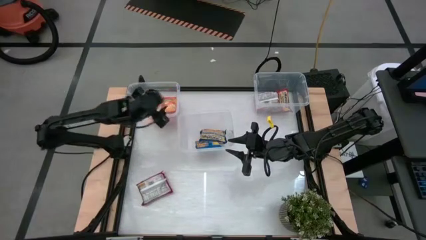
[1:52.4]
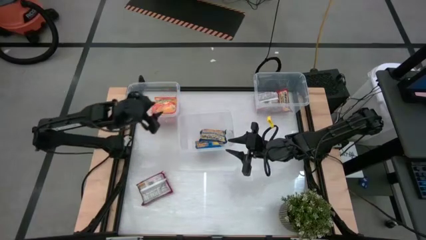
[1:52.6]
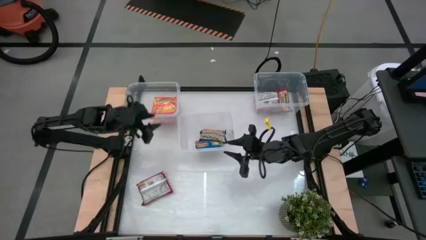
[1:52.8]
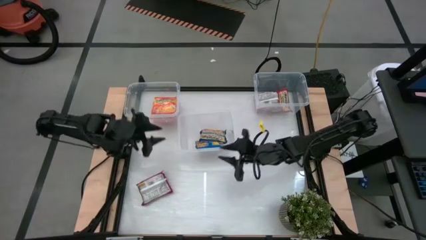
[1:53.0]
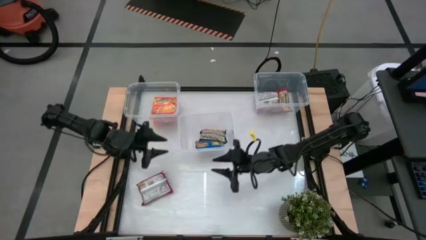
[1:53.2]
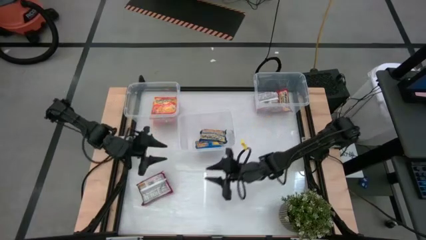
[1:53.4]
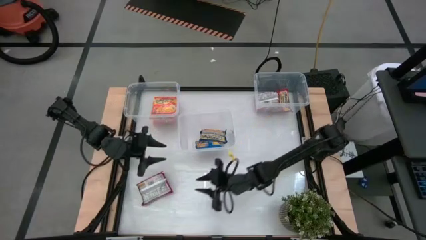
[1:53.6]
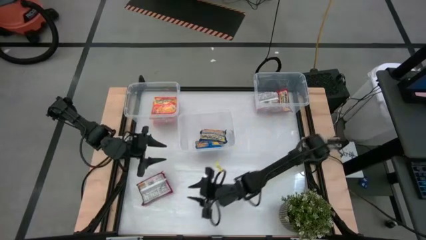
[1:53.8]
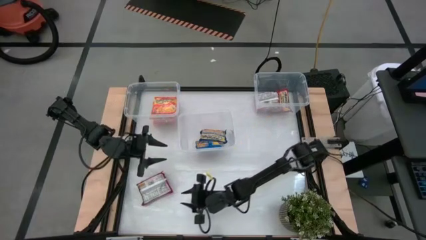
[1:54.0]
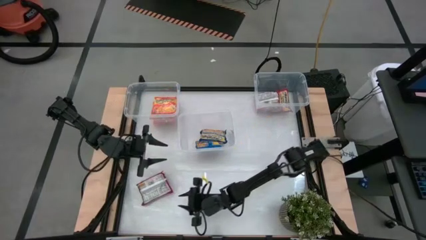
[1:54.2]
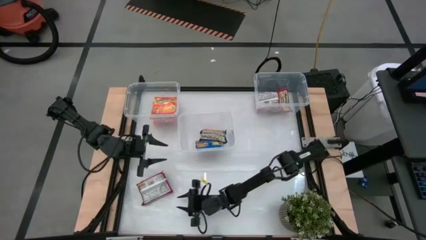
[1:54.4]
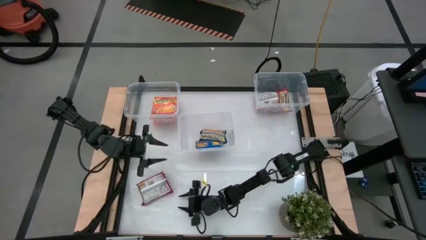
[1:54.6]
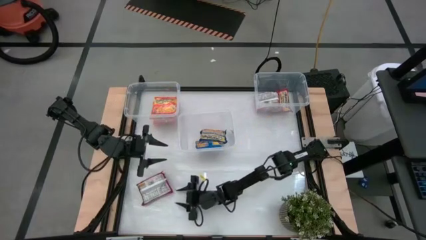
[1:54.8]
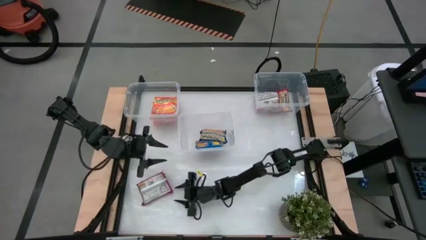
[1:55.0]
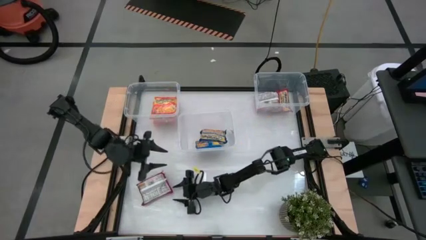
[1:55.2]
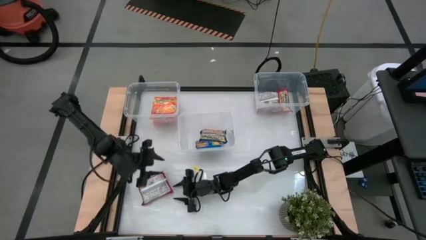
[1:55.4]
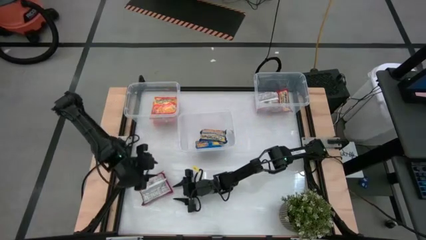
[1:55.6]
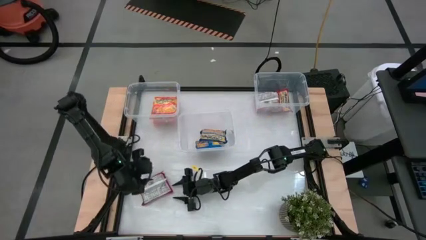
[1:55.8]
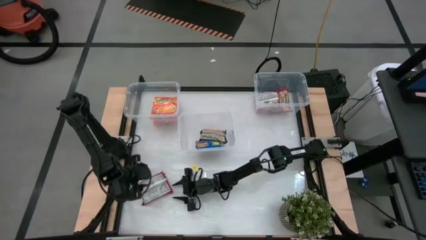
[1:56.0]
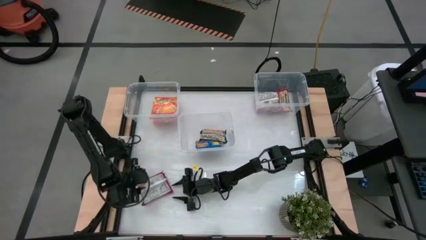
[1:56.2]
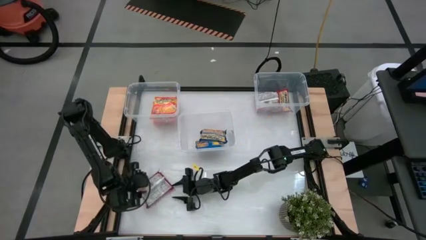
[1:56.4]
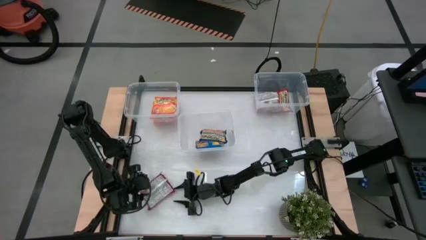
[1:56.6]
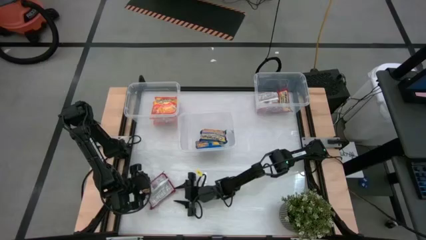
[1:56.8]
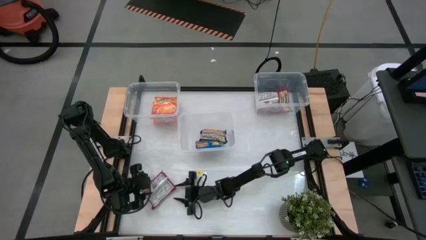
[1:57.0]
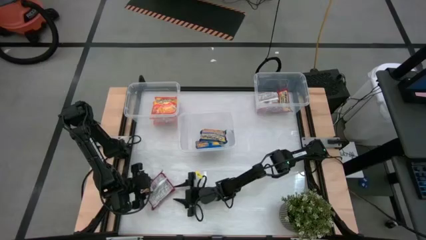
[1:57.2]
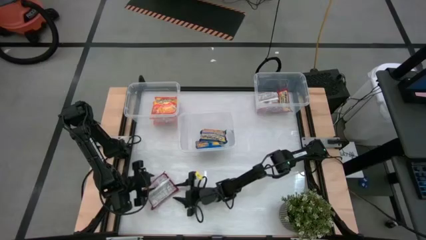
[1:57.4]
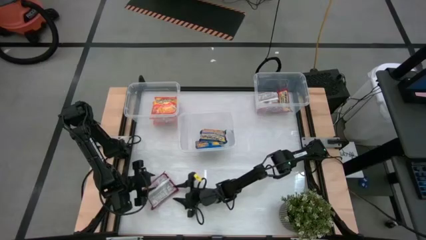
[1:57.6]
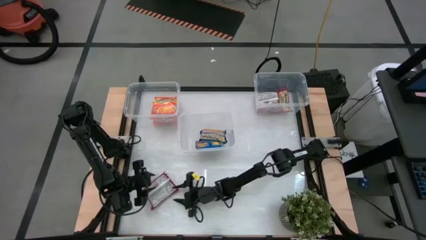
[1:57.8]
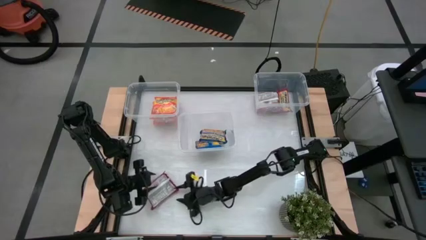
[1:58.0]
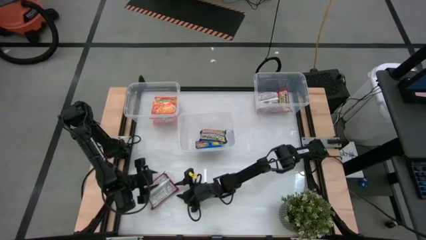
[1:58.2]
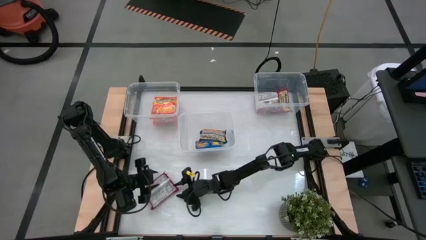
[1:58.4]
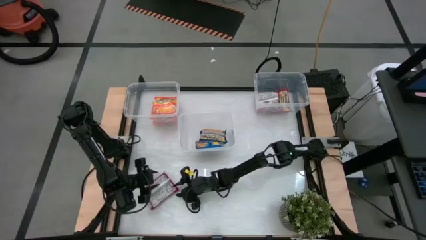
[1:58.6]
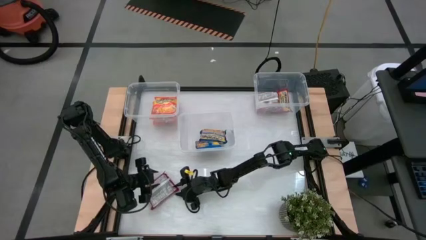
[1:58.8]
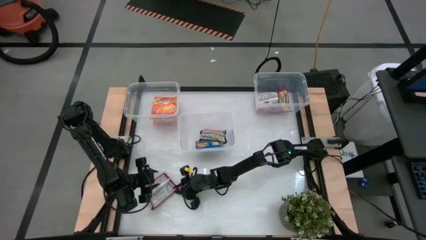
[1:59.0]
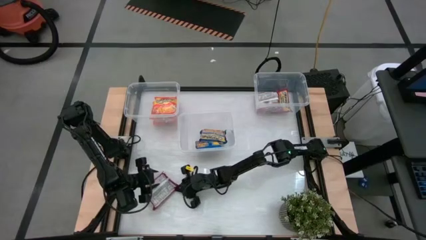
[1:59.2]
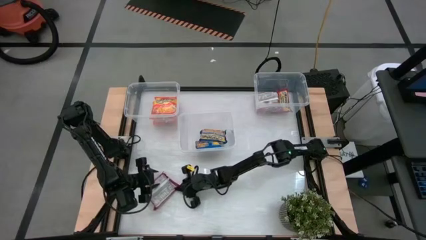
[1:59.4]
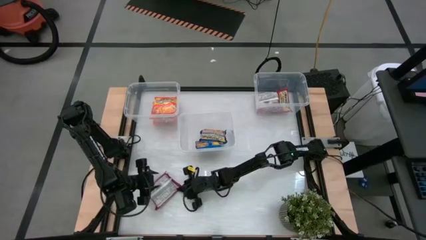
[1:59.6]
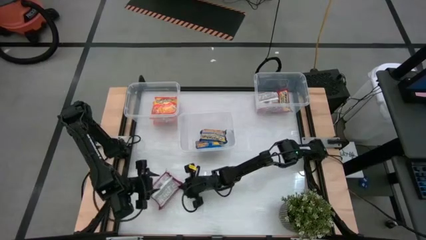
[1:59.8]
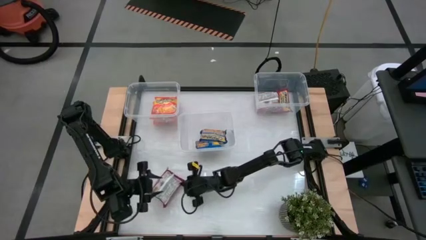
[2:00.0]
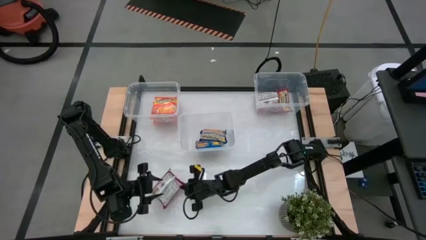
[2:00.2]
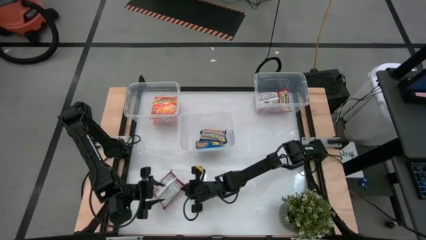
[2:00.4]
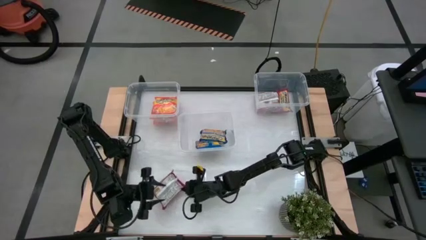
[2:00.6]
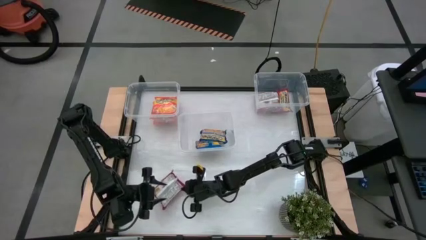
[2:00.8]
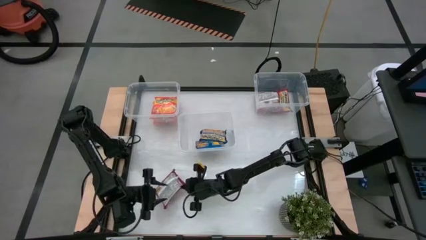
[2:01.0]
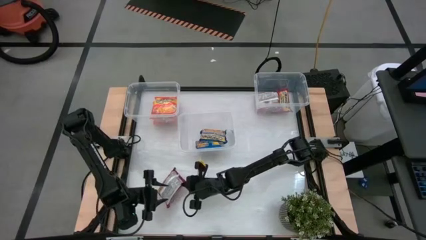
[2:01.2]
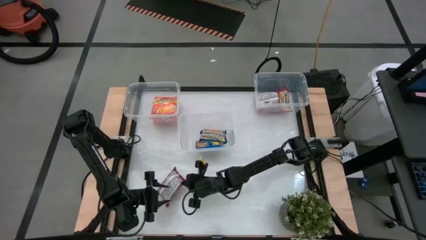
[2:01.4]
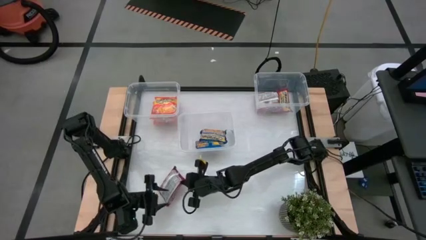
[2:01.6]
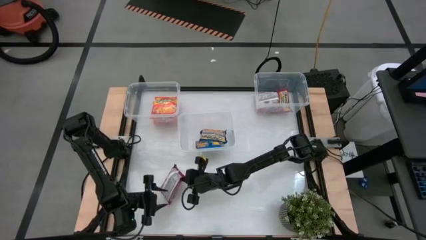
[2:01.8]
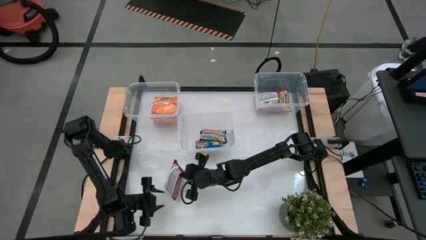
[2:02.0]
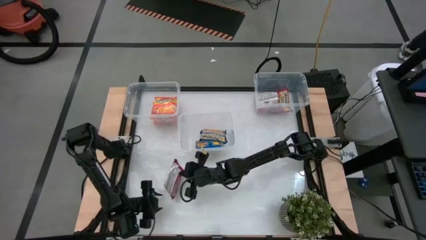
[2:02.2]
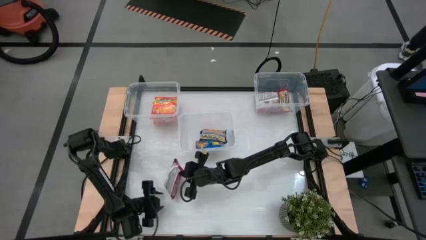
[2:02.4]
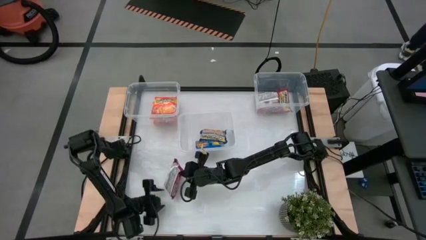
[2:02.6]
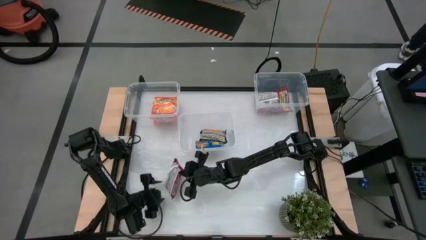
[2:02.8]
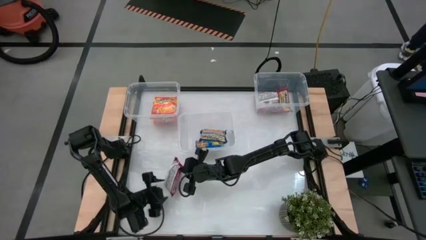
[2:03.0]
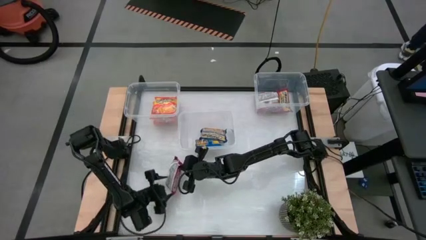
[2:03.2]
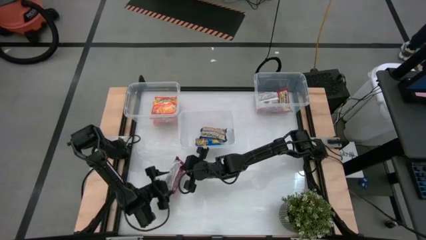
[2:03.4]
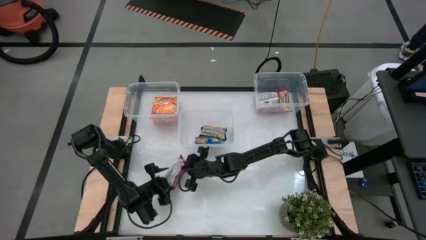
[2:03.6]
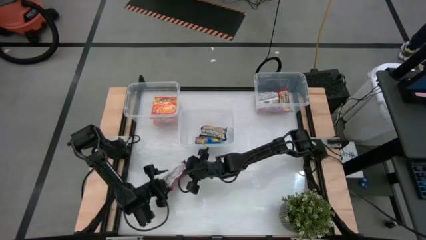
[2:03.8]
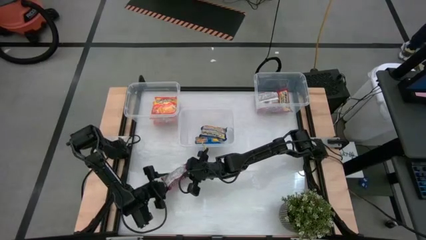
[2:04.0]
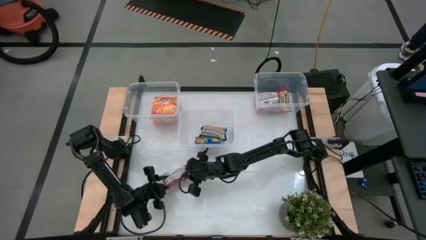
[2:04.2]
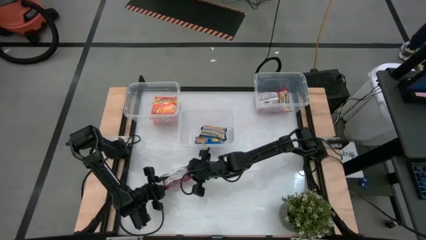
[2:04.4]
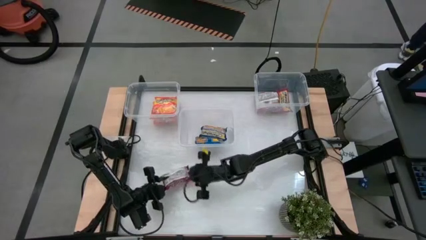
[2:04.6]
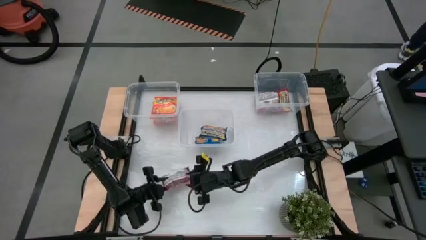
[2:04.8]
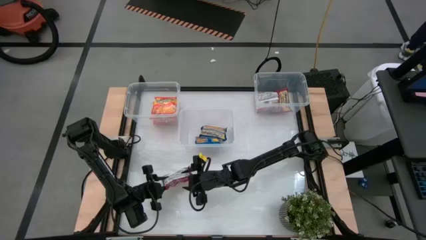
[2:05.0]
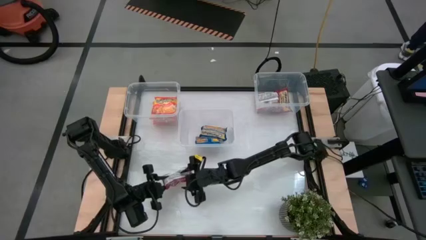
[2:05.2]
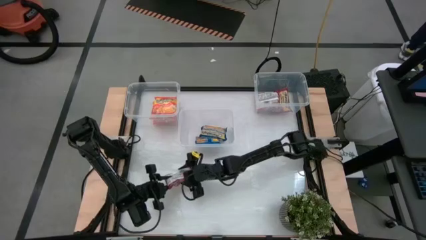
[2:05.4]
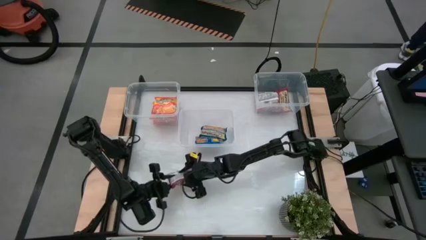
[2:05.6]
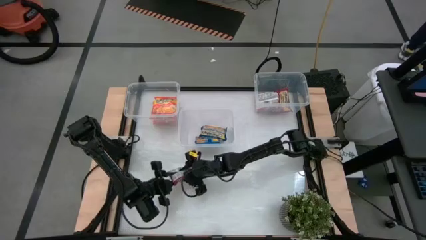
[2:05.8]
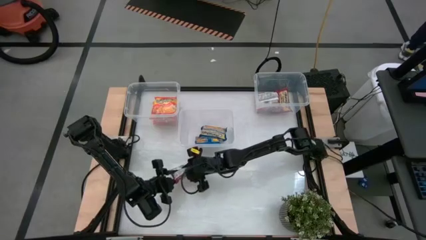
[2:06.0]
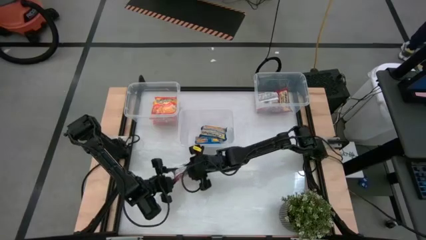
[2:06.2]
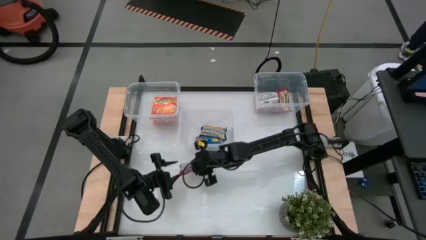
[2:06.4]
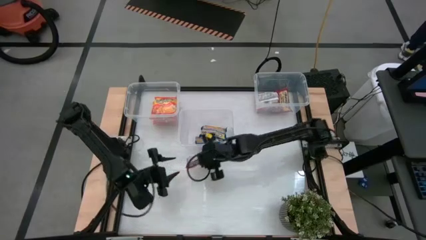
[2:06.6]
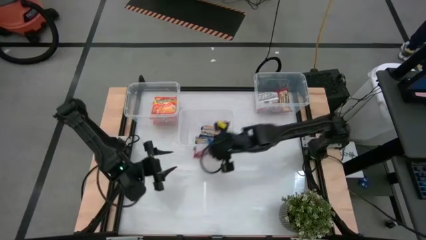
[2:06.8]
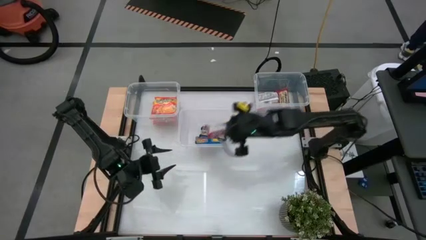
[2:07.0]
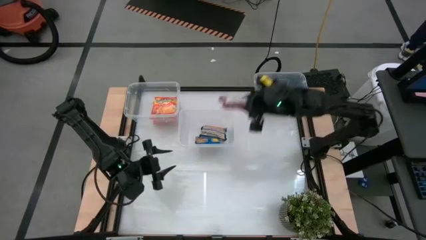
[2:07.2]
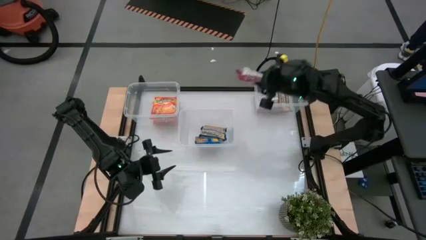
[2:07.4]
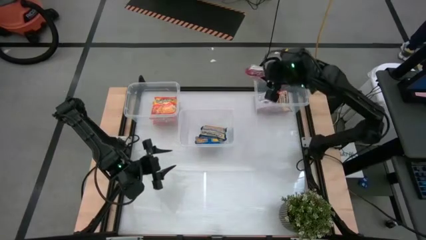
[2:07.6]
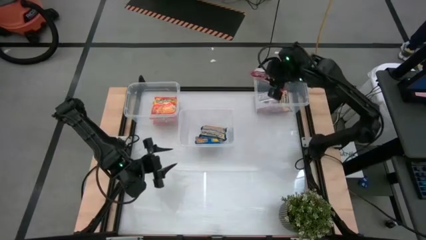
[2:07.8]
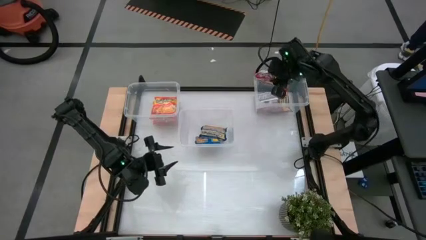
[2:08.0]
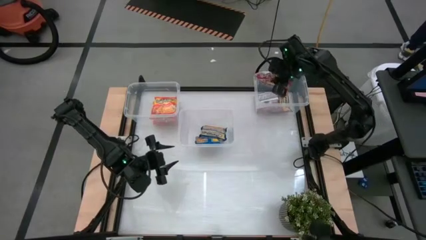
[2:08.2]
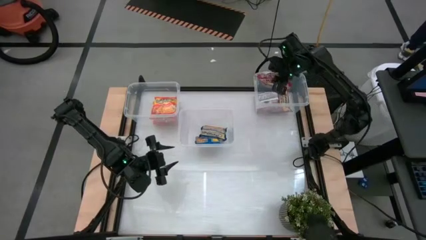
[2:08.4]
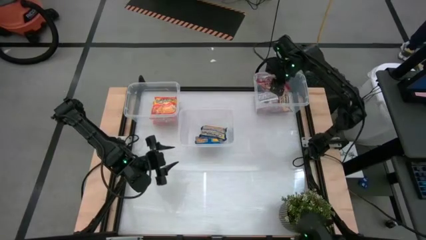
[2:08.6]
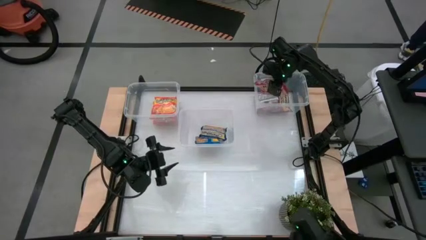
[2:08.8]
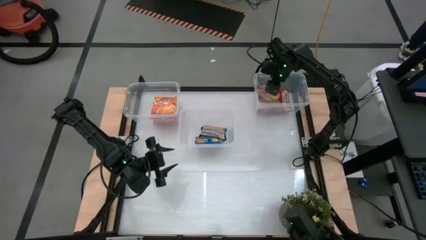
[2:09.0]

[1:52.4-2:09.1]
Task: Sort Maruchan noodles
Put the red noodle pack into the top right transparent bin
